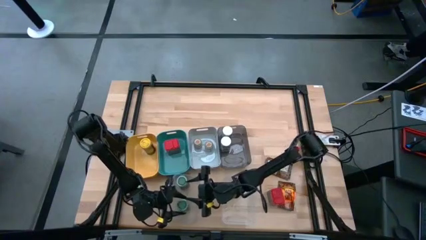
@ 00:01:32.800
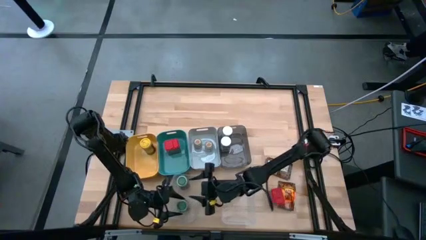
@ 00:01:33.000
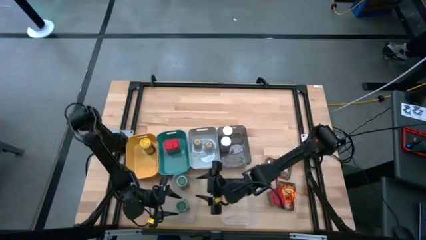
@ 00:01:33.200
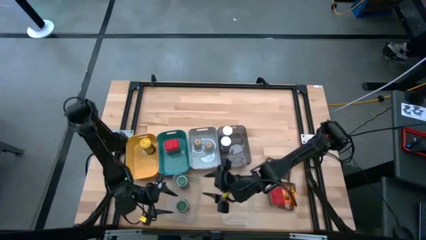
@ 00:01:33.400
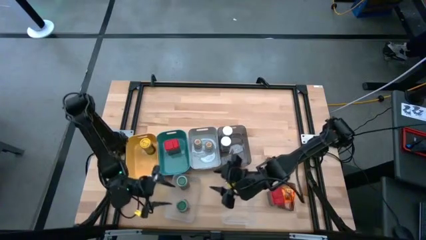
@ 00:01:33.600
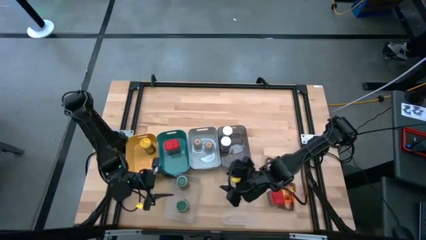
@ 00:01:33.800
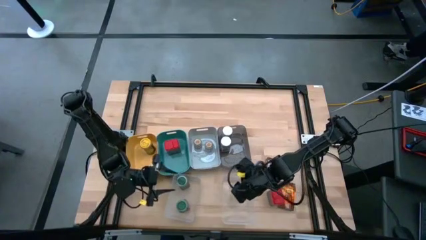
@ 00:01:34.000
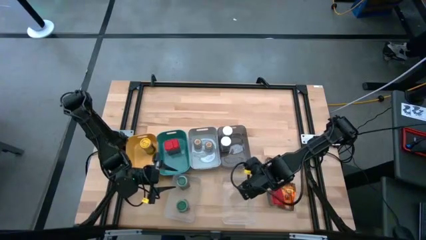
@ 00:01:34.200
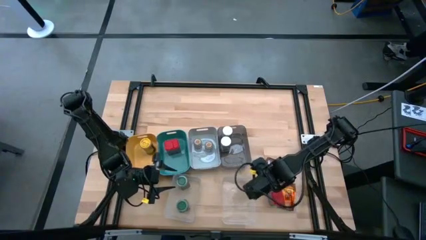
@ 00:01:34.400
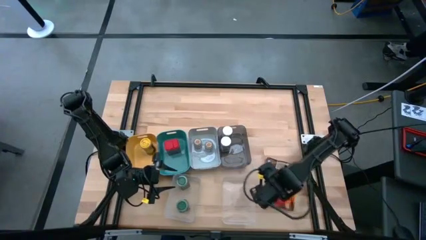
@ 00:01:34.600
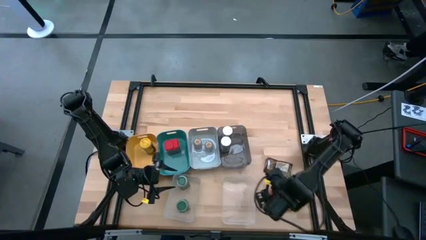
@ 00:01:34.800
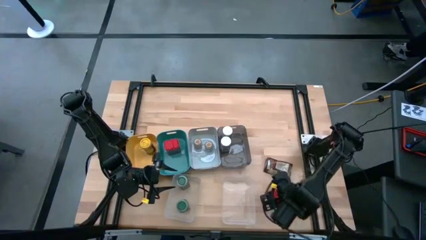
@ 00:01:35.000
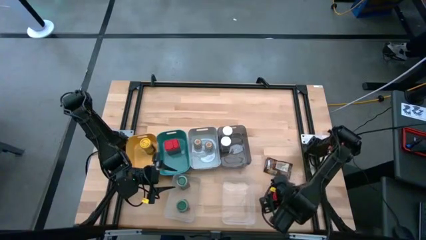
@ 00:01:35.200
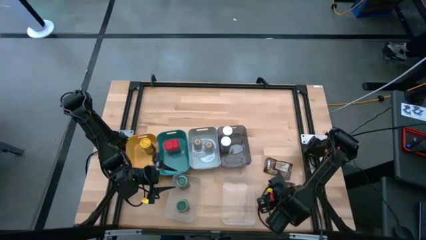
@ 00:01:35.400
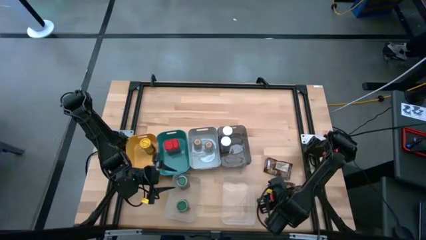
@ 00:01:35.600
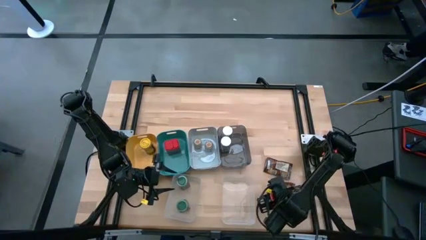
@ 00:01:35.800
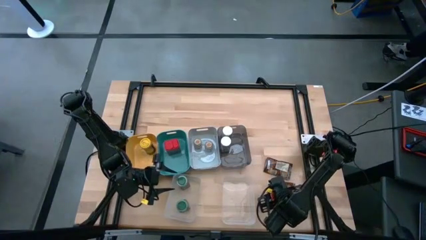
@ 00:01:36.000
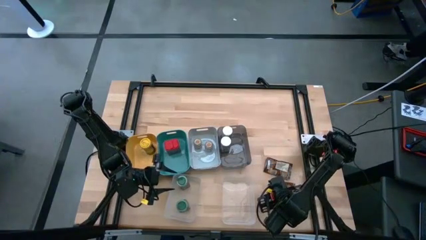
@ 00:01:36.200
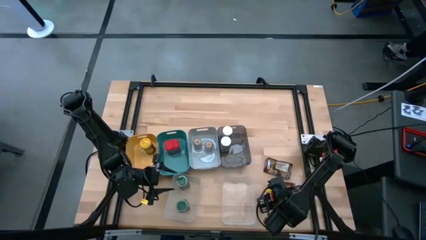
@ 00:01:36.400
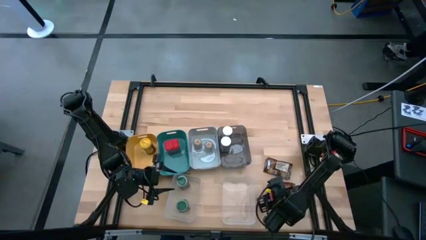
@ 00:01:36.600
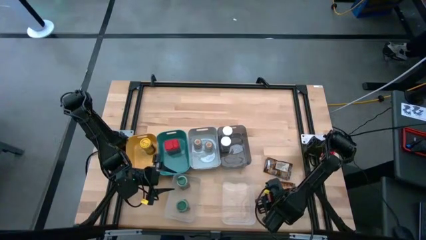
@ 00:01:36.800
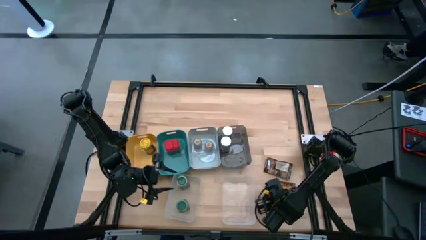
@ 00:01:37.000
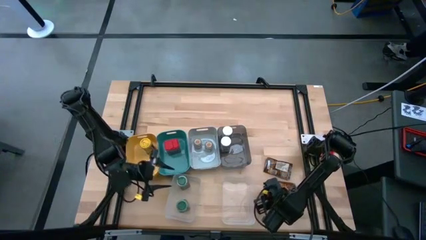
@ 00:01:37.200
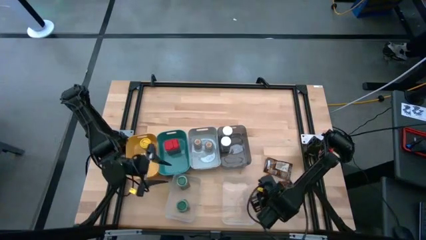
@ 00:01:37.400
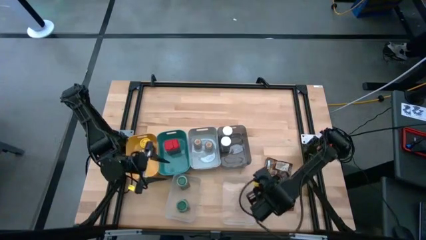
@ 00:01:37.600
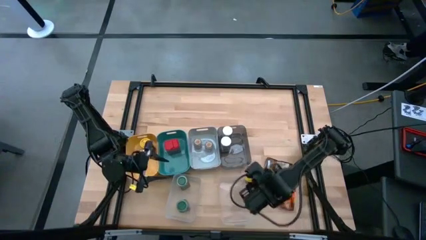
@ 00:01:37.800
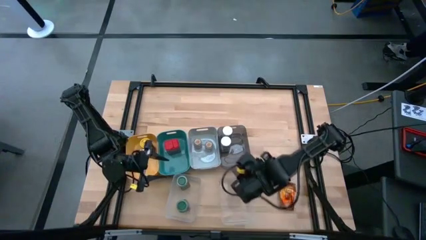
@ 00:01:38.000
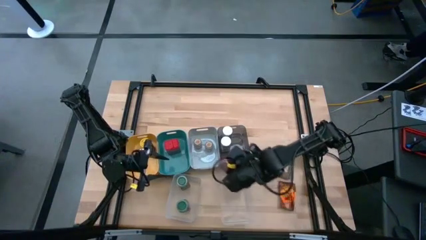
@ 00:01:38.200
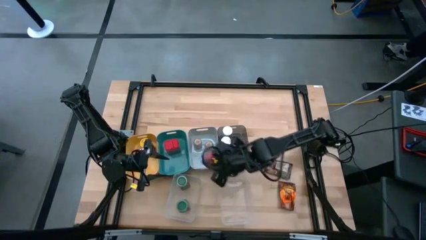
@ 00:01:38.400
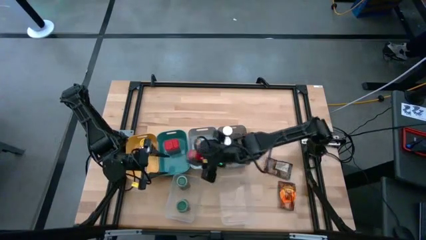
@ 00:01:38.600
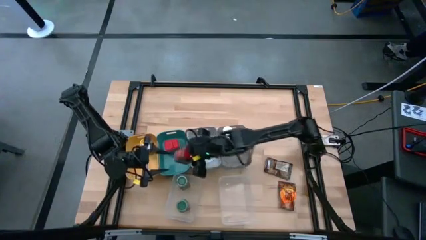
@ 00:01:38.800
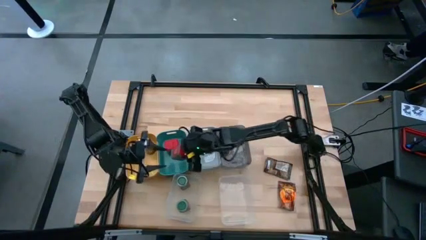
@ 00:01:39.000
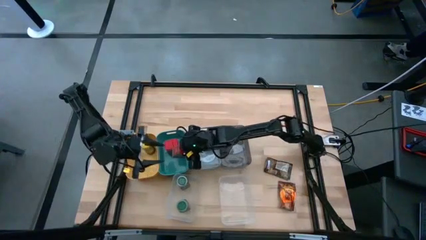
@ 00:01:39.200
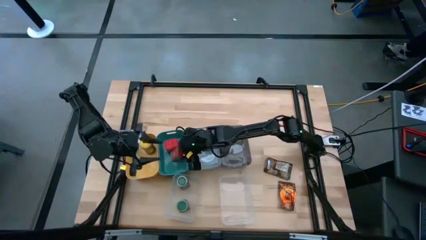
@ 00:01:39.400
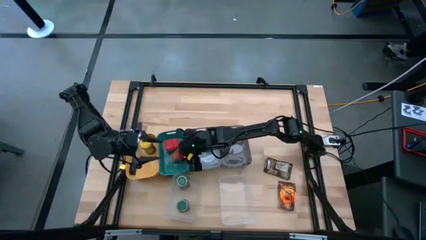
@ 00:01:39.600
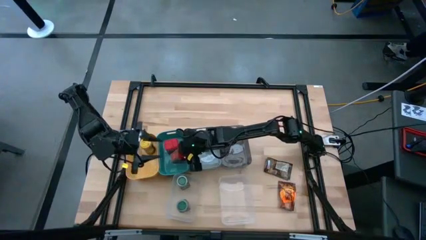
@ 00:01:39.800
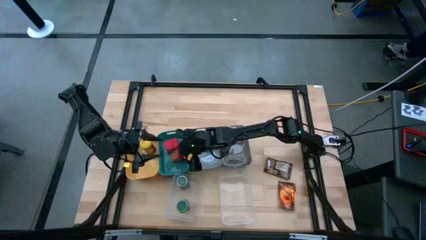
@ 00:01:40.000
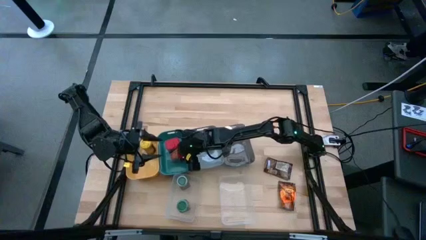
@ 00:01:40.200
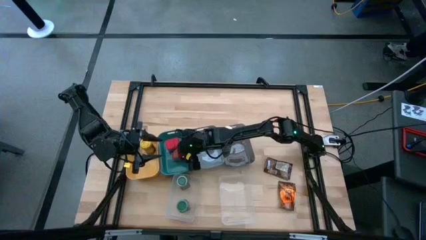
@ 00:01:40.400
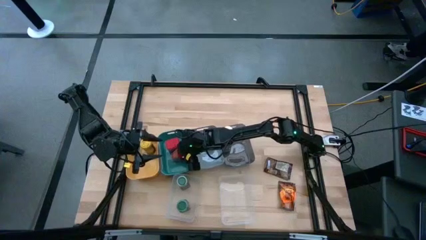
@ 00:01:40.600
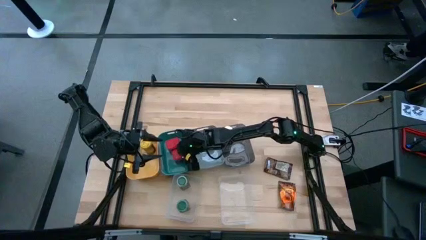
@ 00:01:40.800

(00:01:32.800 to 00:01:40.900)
Task: Sort spices by type
Put the red seasoning can into the green bin

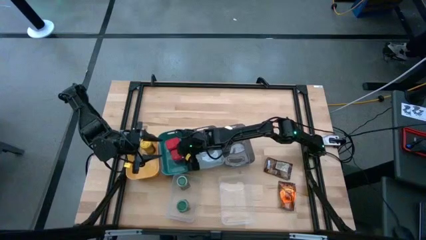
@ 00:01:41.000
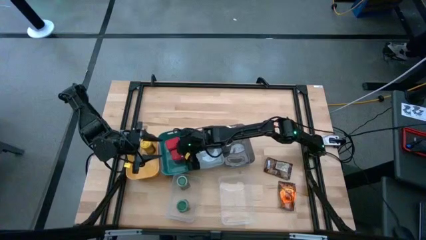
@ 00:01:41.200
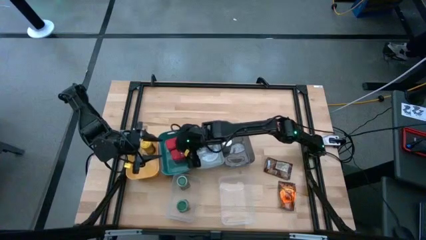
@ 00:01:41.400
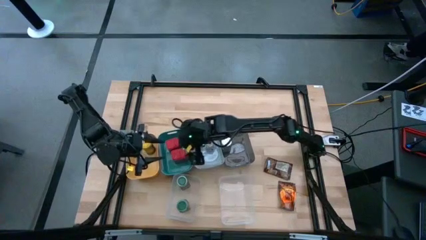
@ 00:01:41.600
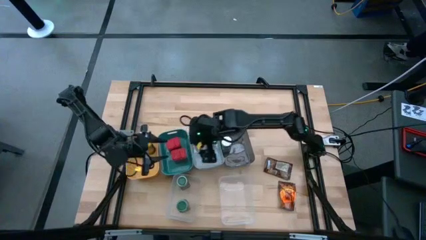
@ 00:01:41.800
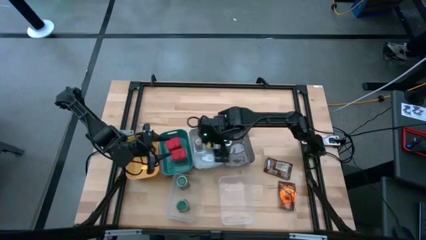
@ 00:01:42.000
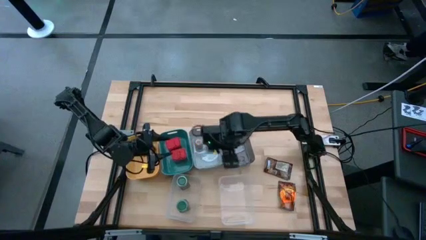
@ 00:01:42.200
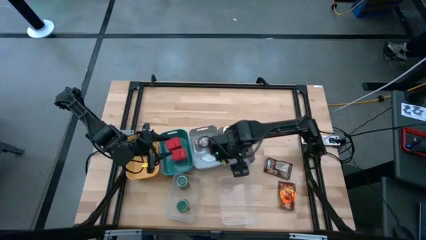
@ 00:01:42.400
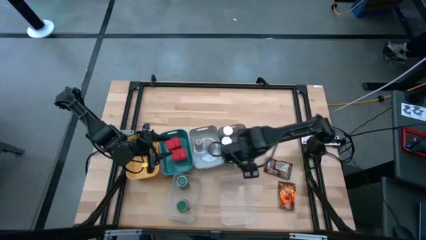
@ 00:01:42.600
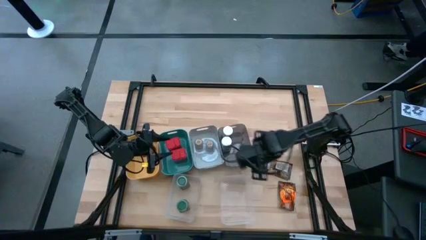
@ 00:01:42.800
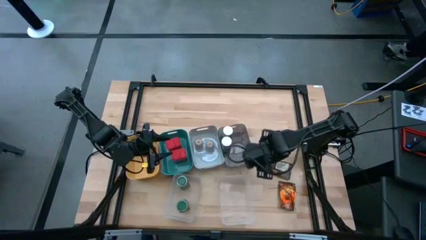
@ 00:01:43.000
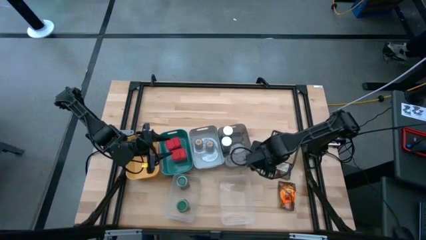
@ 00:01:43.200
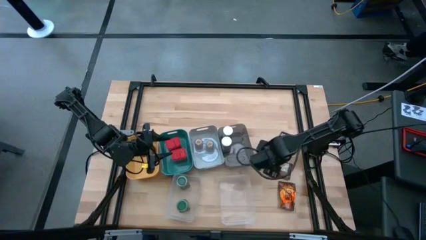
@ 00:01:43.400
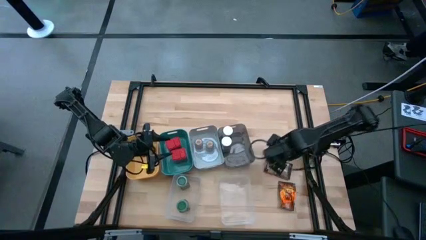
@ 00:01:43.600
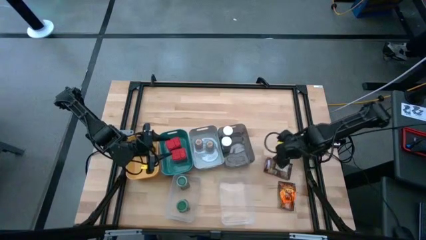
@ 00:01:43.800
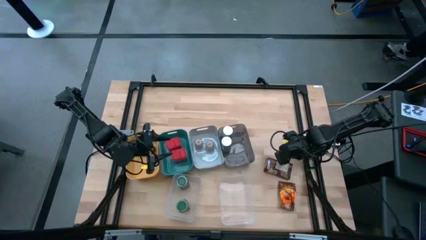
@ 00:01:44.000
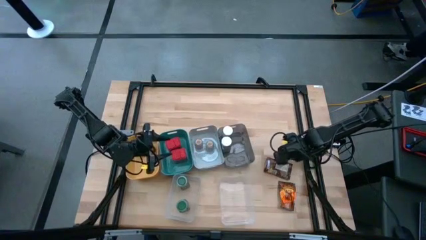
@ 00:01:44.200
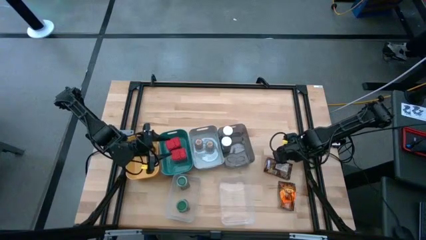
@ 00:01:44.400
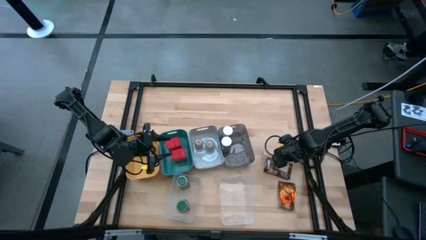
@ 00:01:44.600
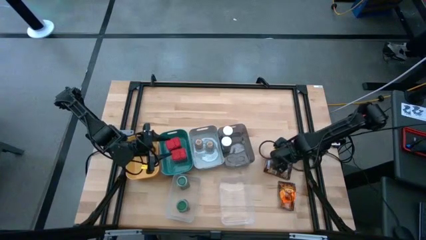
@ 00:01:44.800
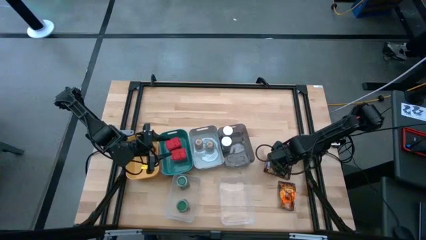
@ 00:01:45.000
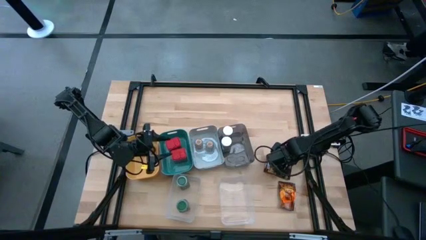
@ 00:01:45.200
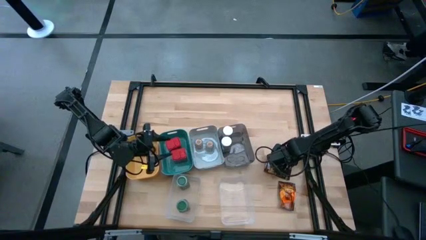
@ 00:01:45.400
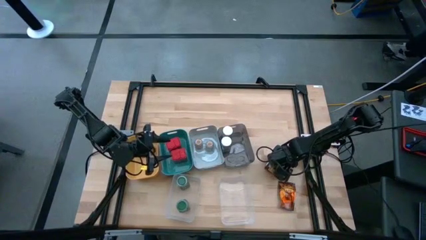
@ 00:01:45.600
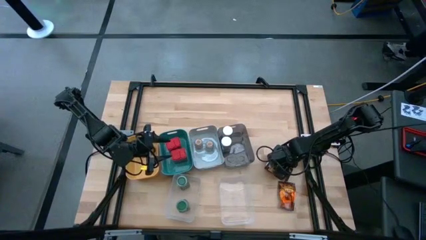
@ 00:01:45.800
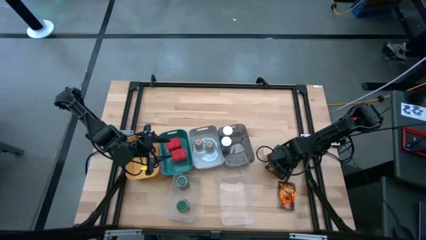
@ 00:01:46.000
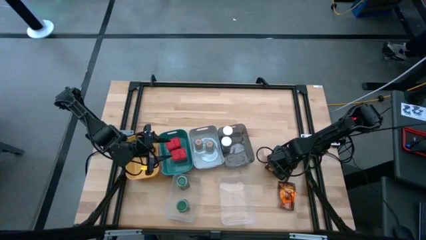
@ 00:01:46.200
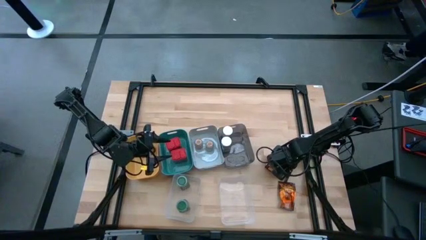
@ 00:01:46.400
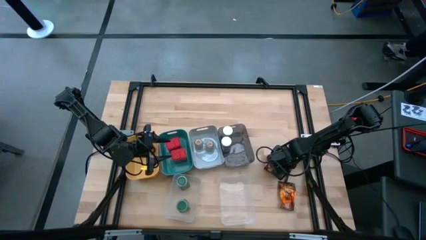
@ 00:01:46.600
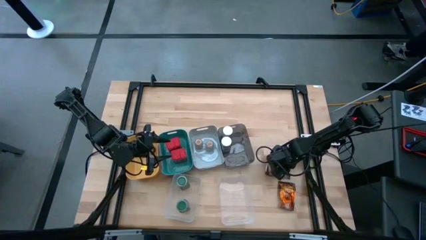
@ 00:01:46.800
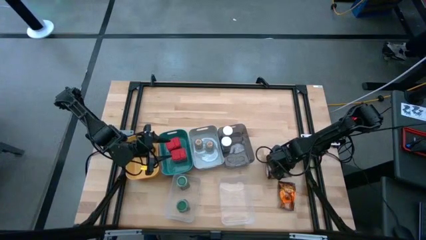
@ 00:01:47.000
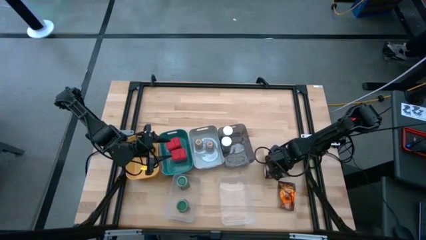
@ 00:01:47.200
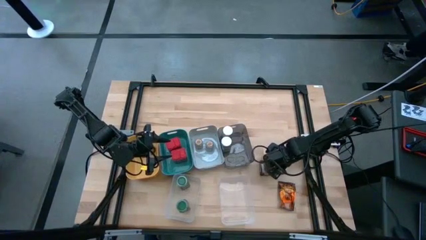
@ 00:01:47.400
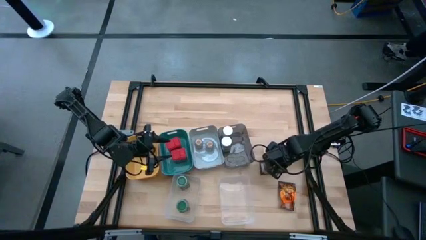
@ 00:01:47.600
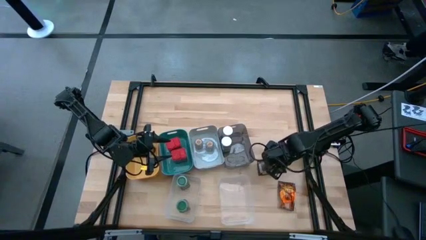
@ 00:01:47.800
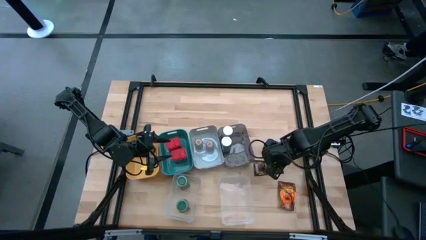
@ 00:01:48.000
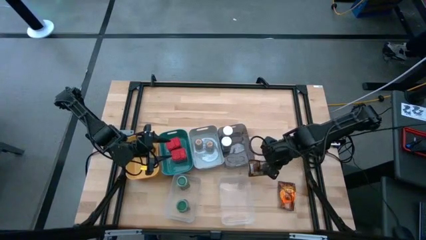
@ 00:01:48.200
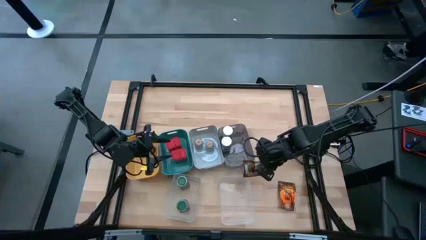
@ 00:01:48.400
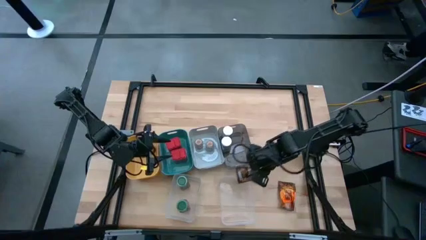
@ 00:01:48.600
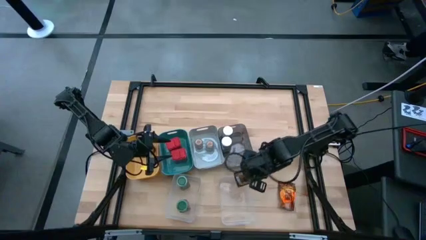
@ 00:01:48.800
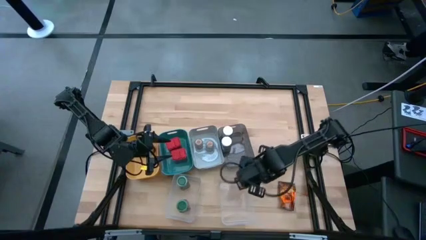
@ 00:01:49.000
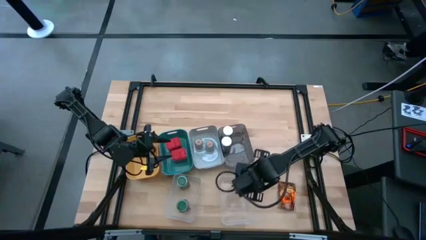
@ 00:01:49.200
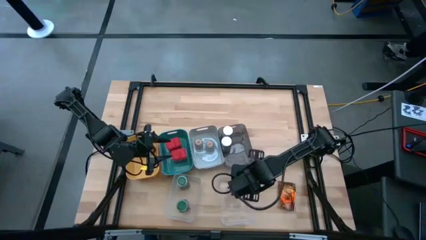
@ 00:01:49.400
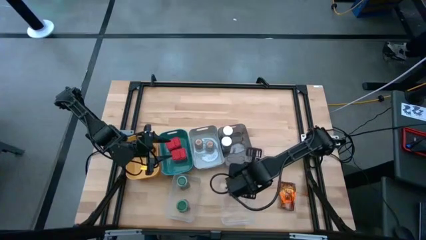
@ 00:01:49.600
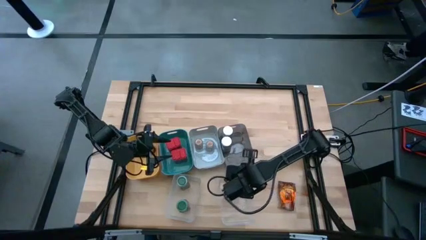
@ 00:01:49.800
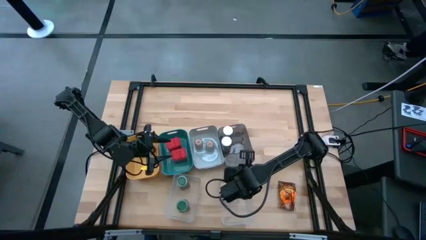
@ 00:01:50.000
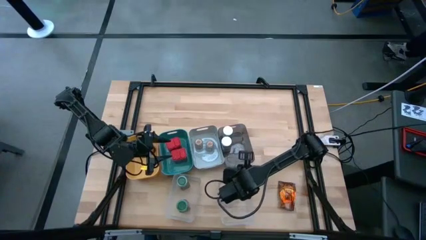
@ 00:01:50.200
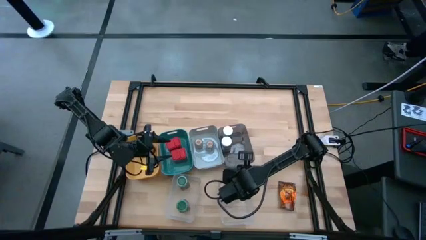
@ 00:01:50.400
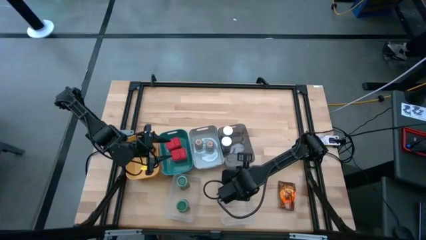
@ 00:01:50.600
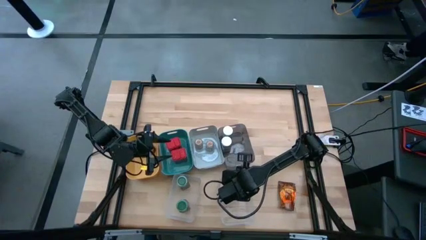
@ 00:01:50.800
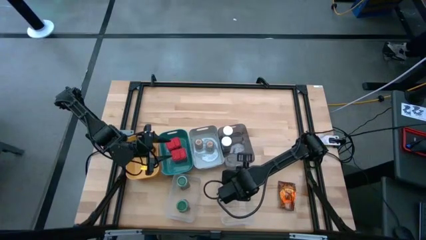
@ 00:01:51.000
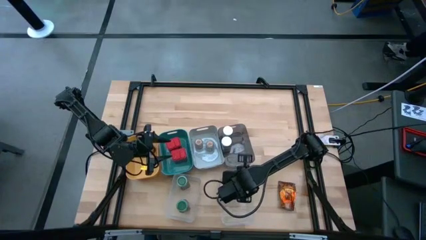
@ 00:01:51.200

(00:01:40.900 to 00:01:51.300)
Put the top orange seasoning pack into the right transparent bin
